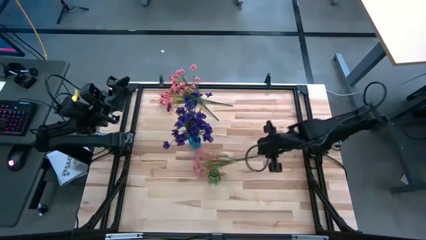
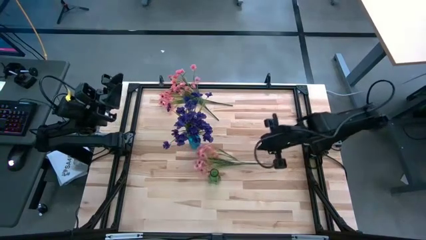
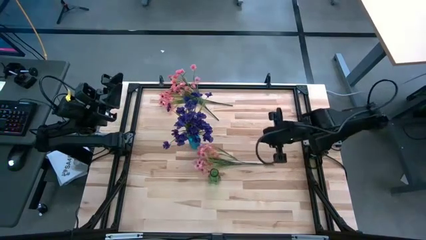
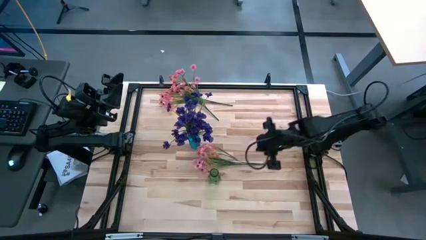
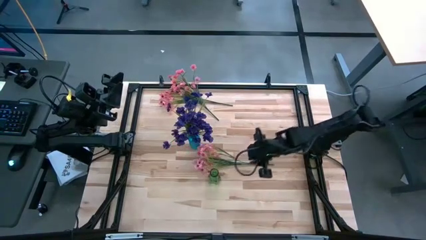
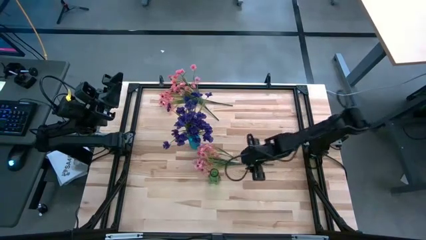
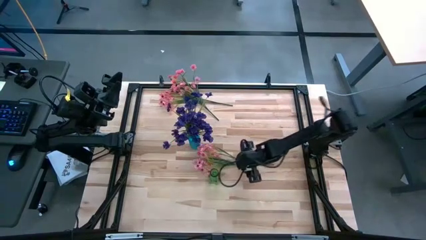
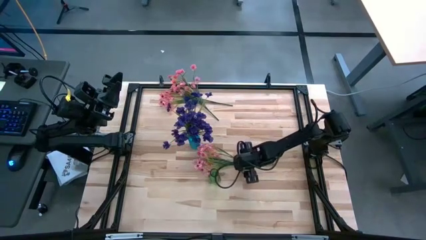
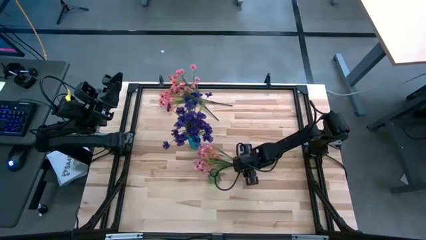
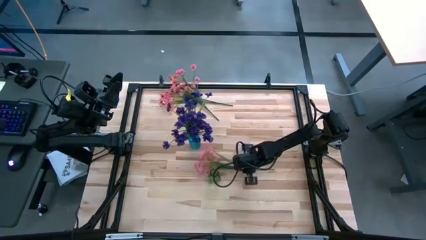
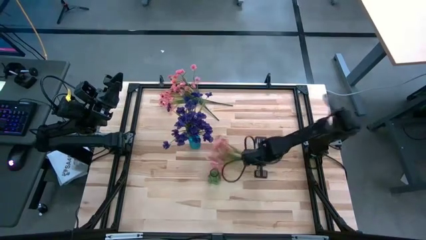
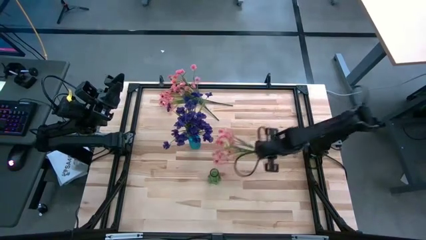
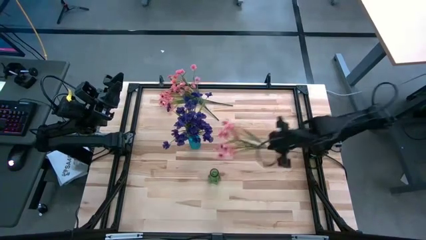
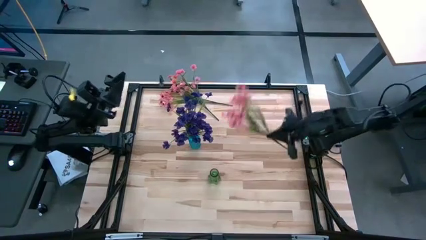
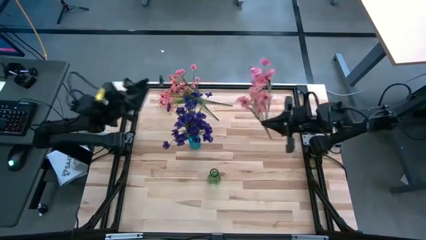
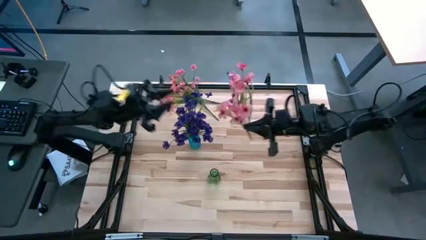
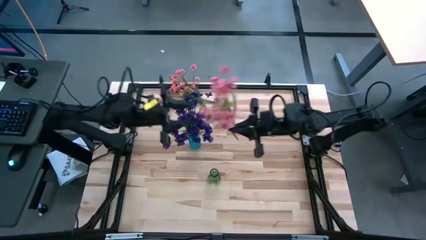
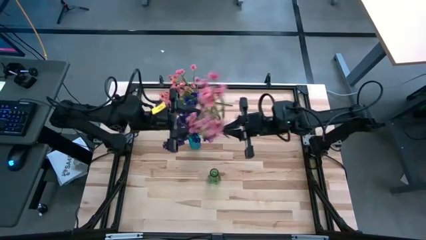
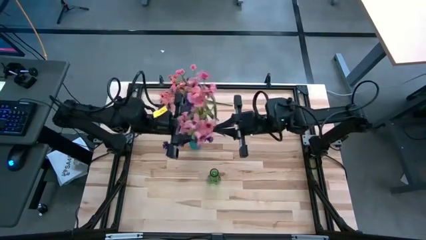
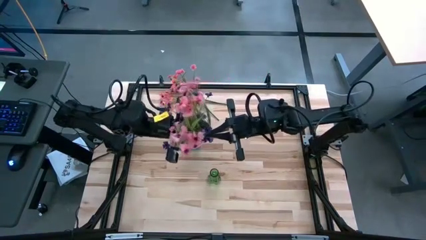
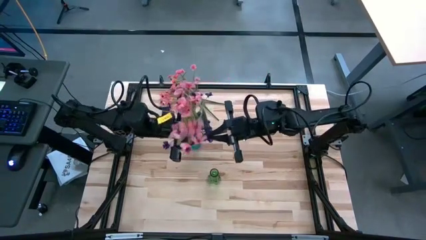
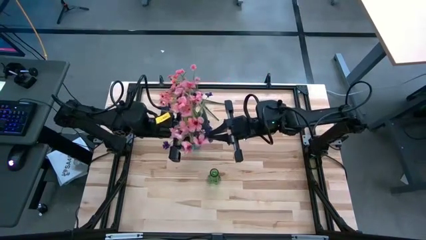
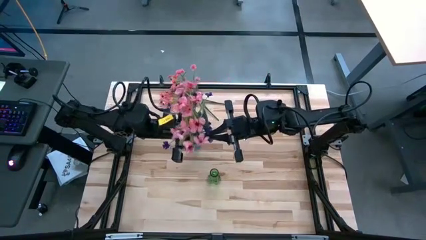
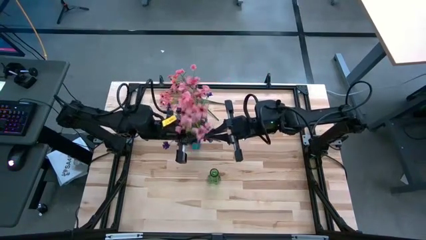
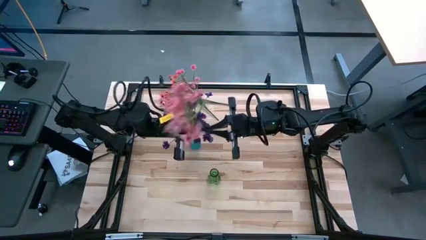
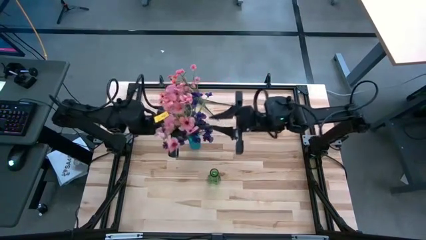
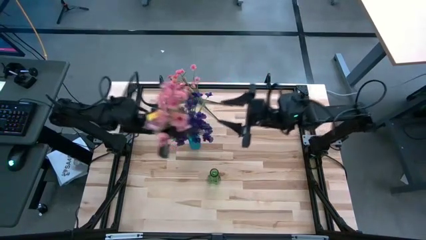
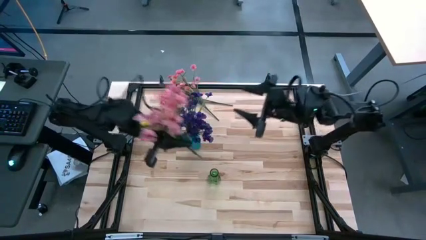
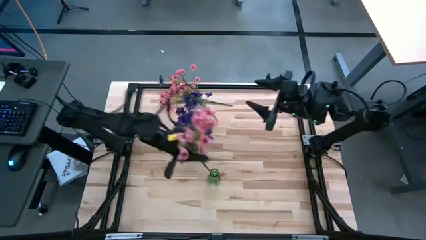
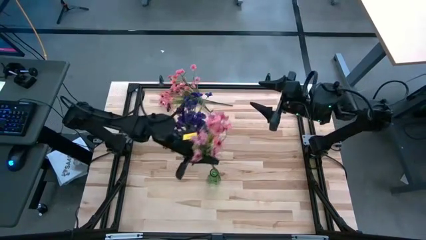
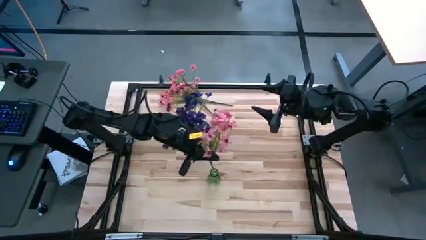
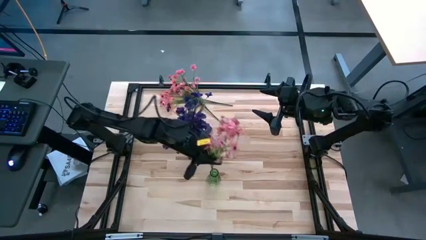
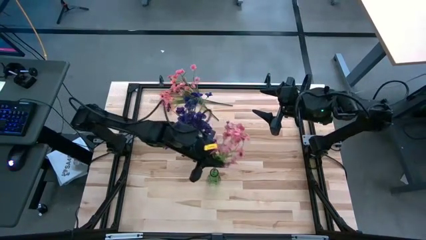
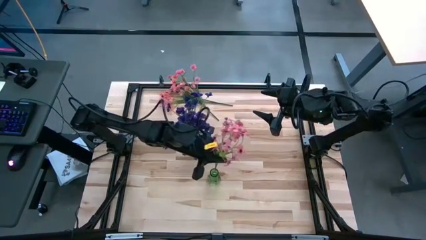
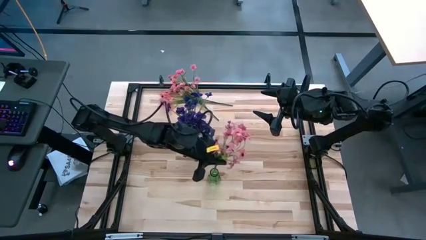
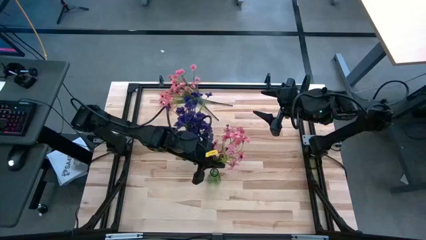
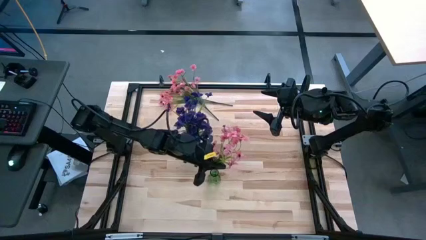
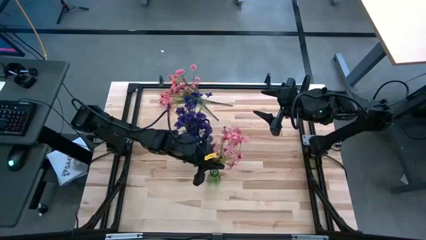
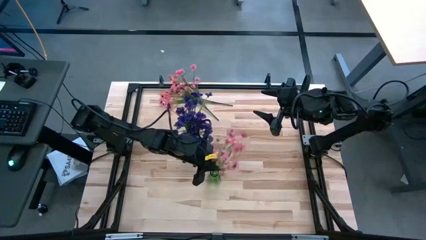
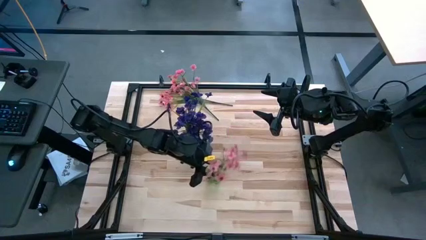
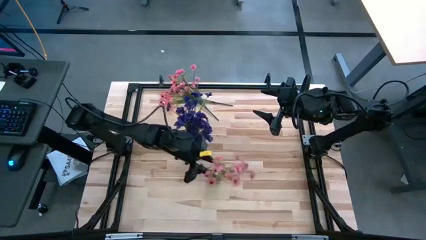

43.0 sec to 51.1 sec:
Task: Sort flowers into vase by color
Put the bottom pink flowers into the green crystal vase

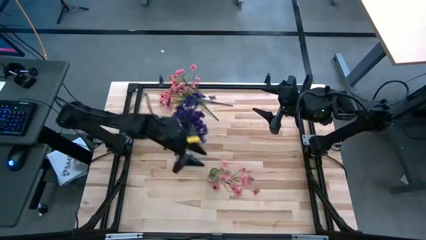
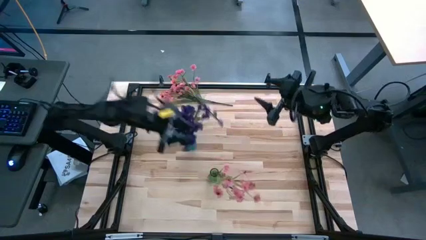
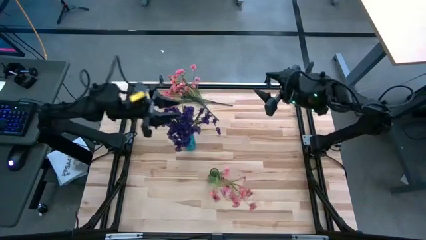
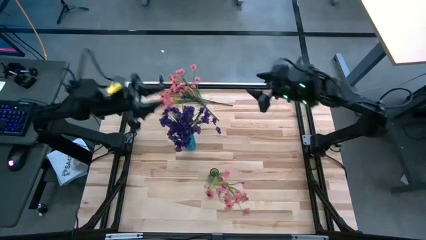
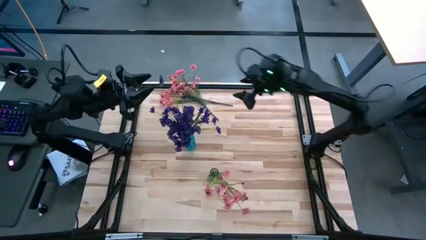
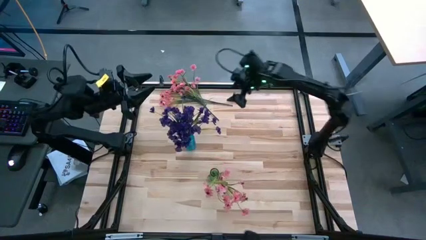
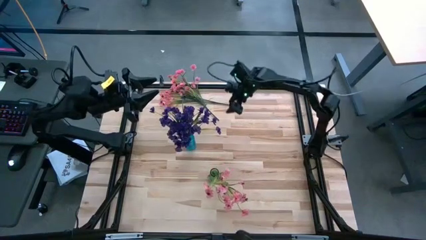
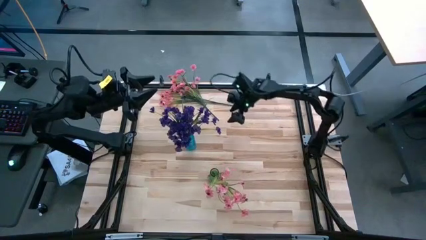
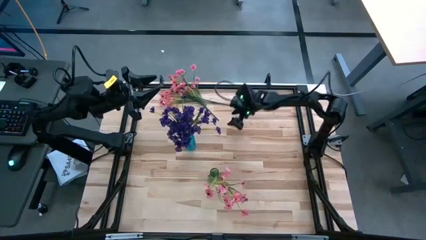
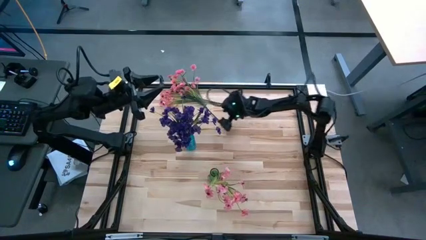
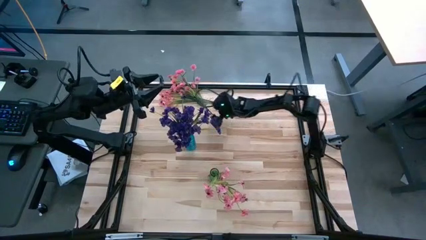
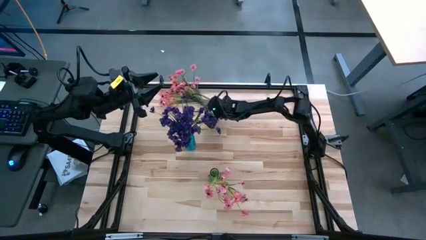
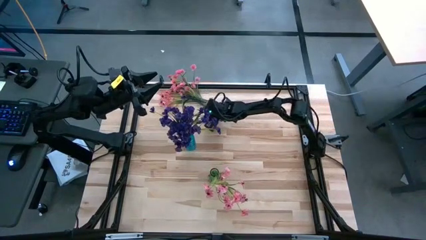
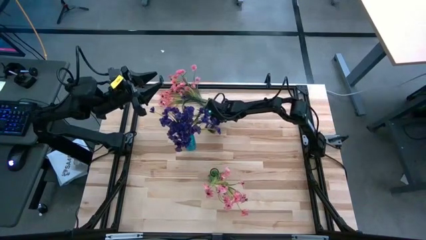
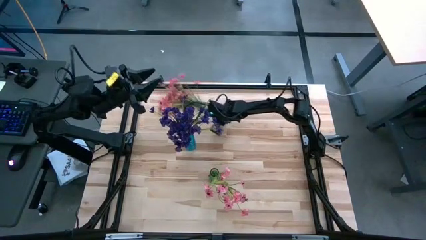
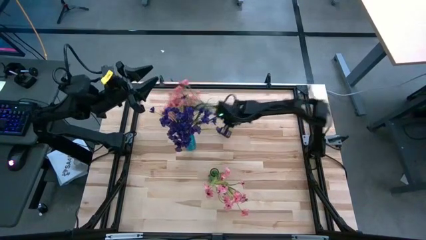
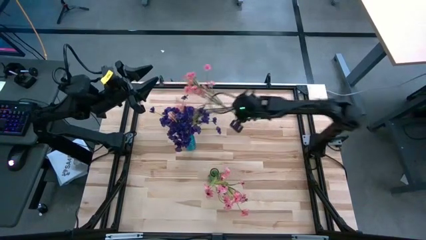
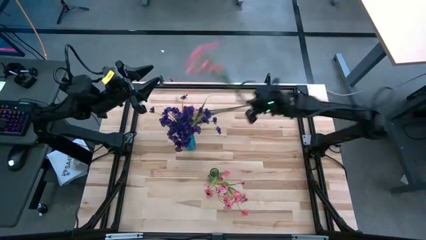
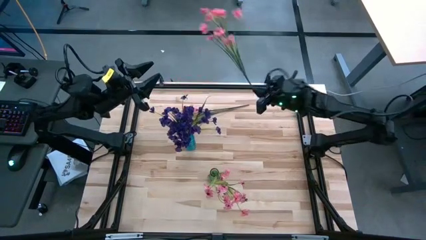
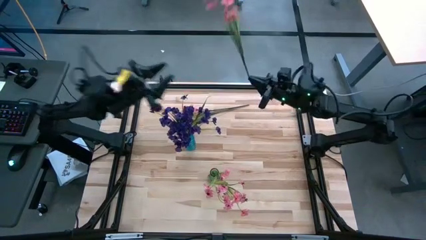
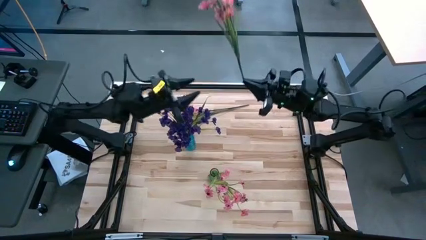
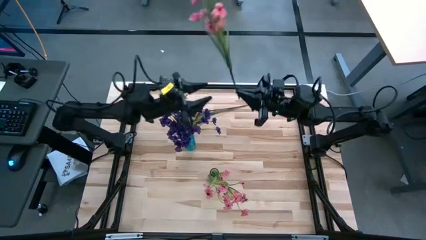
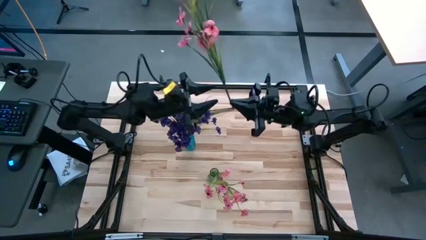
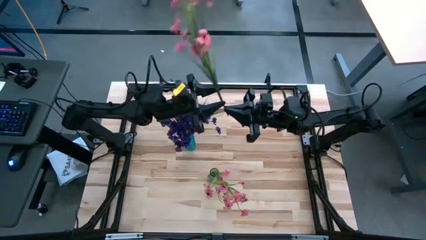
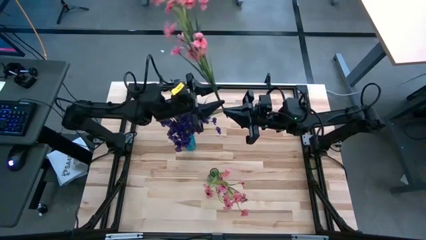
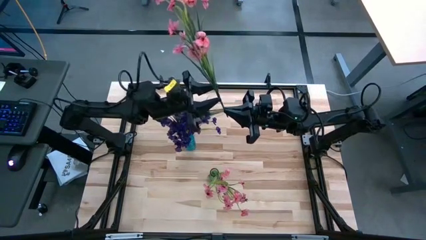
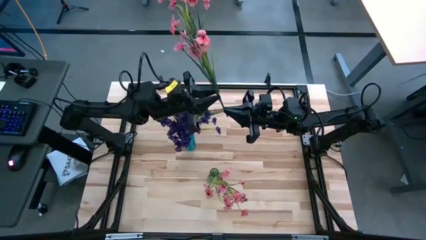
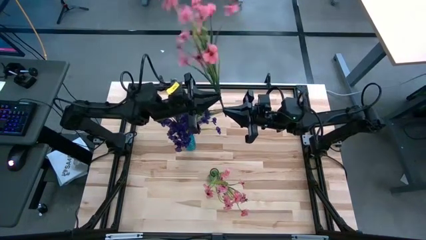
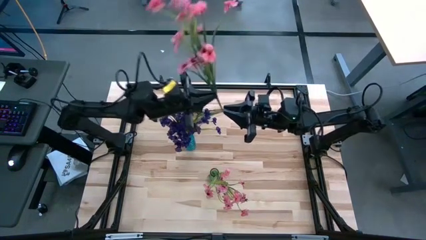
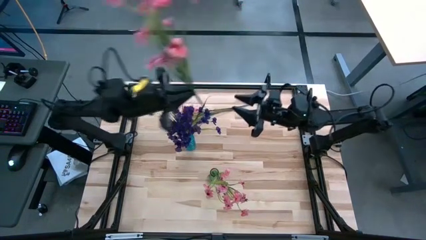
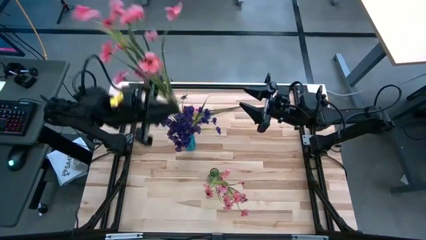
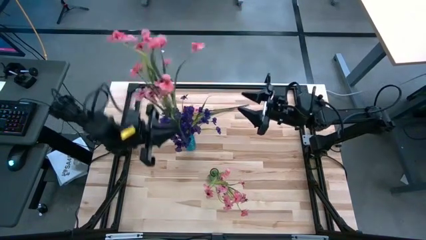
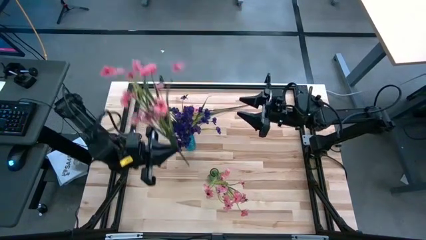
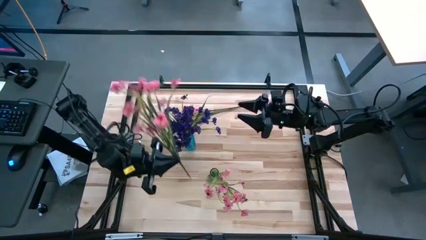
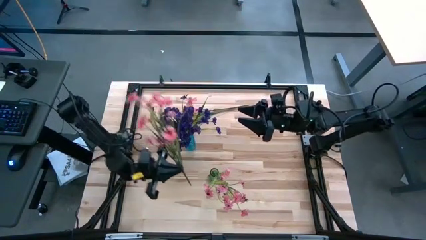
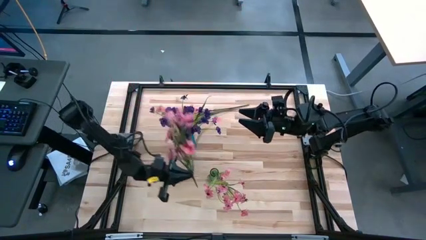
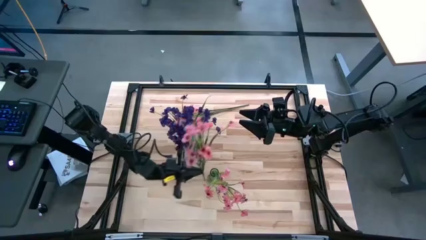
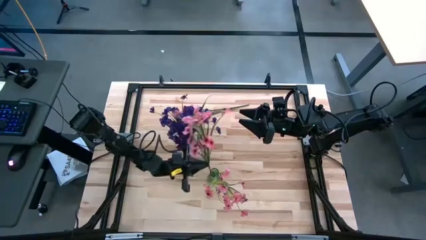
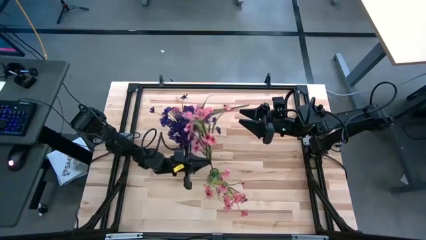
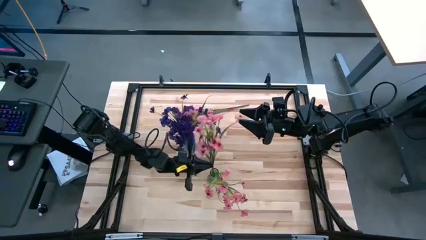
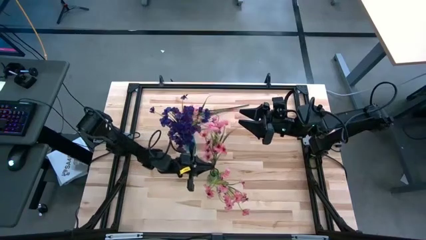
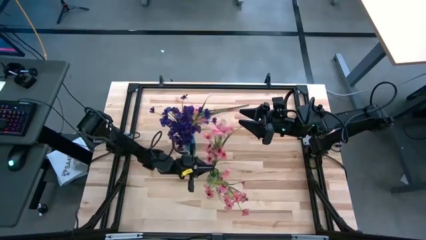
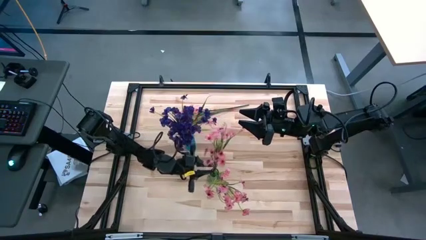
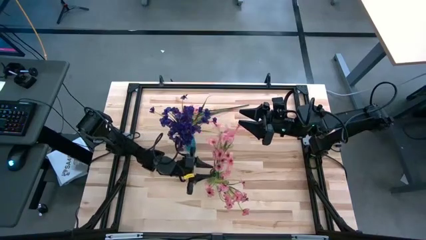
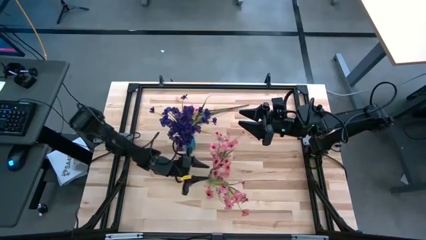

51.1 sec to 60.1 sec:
Put the bottom pink flowers into the green crystal vase
